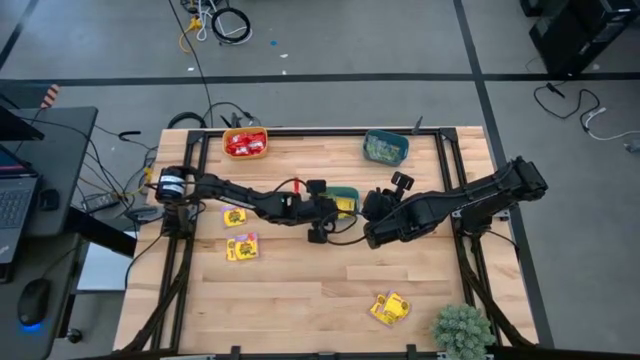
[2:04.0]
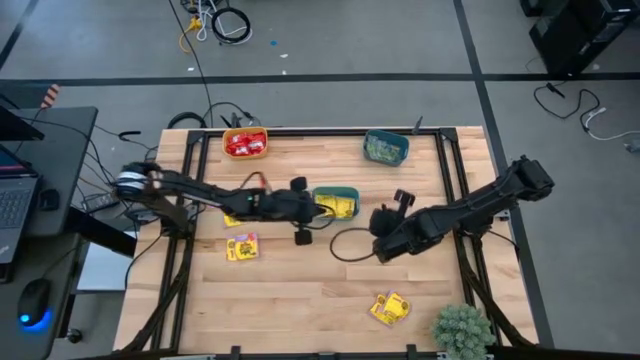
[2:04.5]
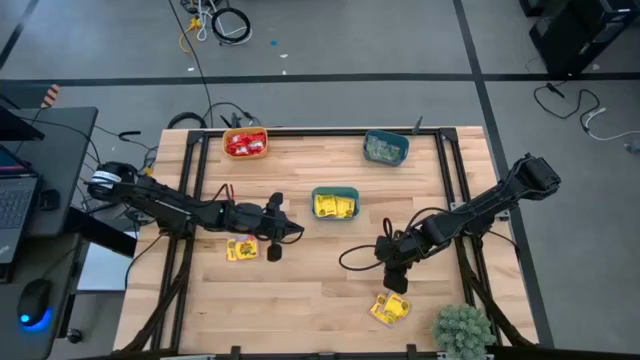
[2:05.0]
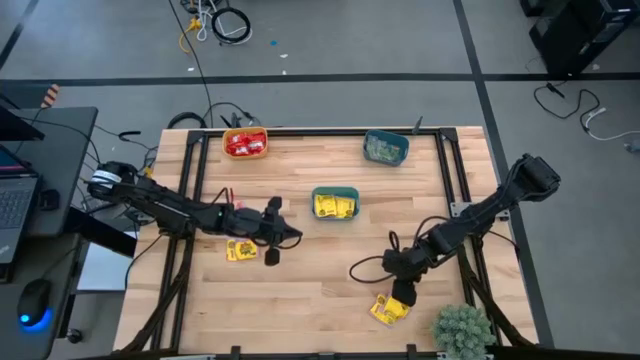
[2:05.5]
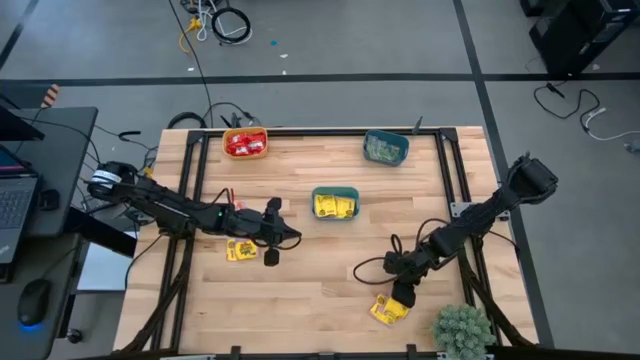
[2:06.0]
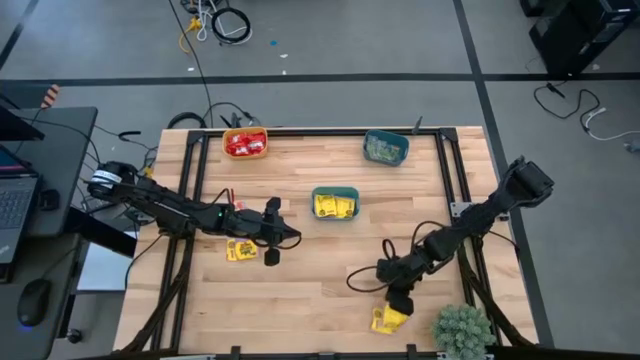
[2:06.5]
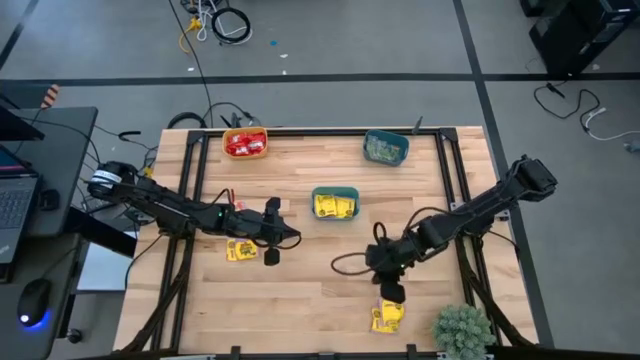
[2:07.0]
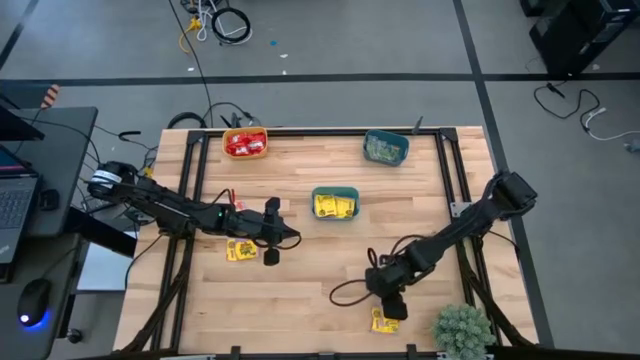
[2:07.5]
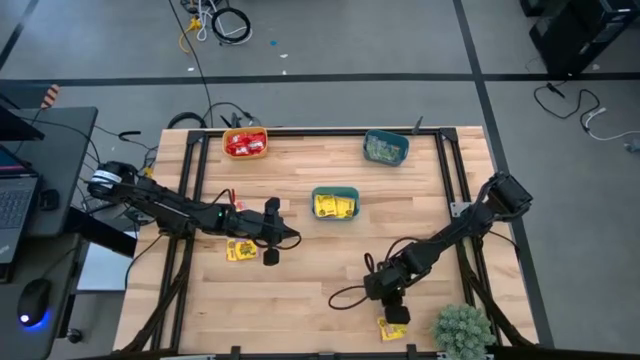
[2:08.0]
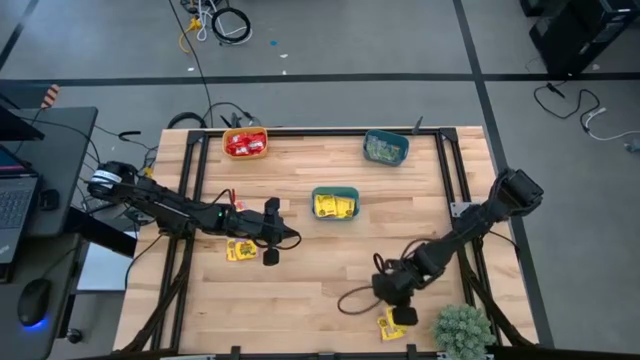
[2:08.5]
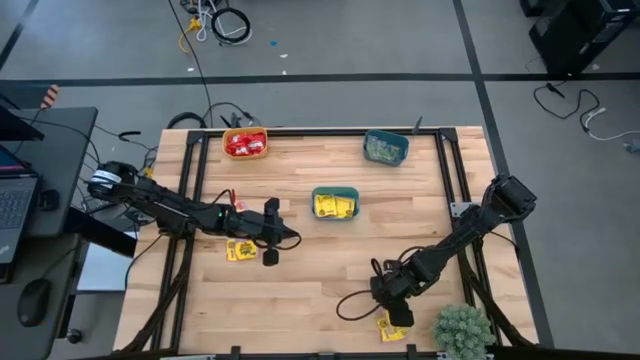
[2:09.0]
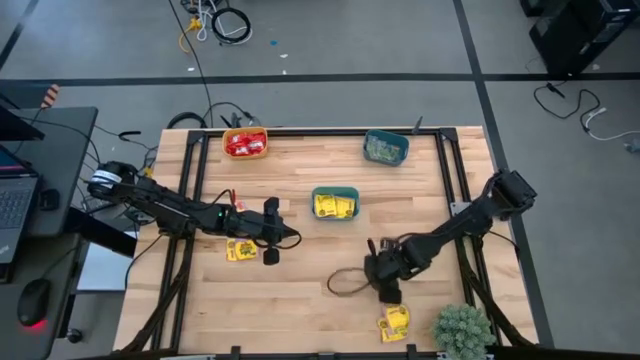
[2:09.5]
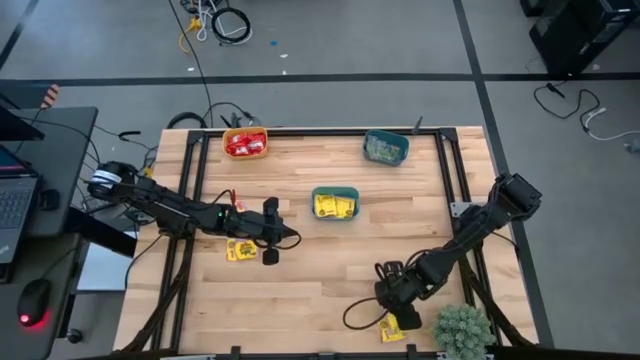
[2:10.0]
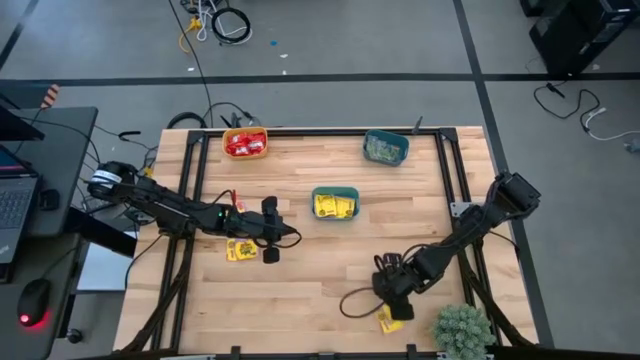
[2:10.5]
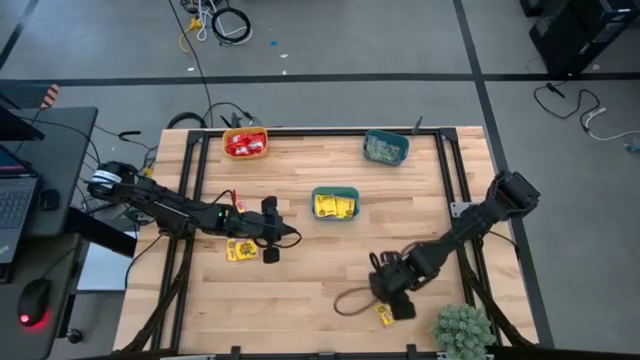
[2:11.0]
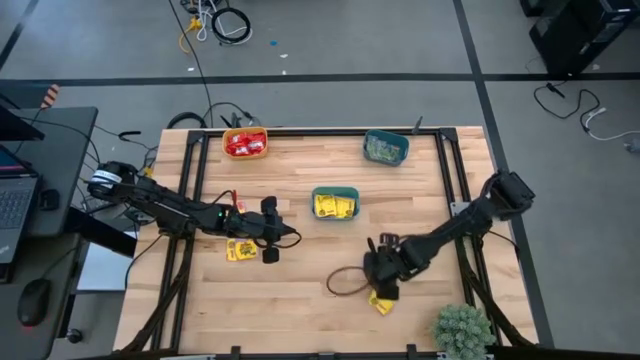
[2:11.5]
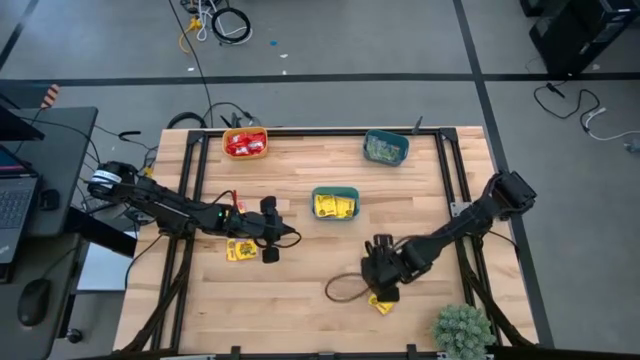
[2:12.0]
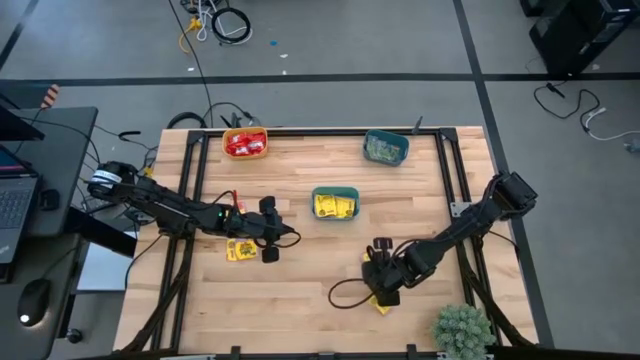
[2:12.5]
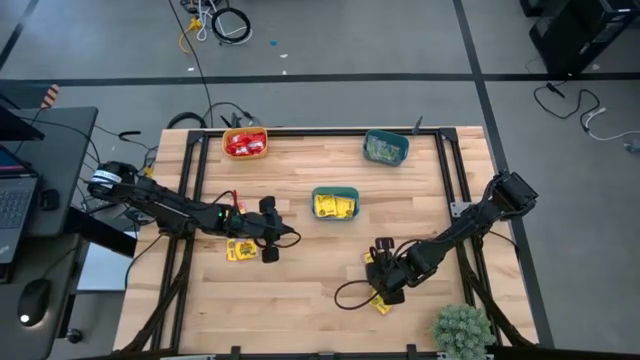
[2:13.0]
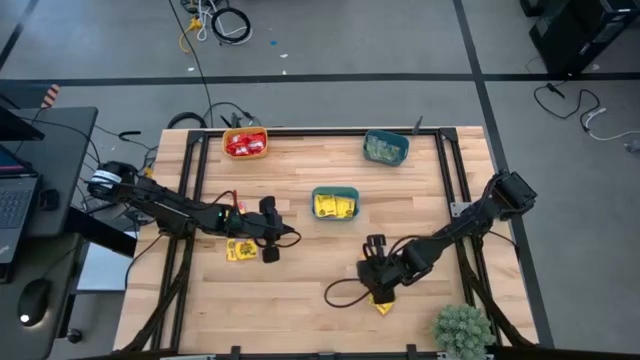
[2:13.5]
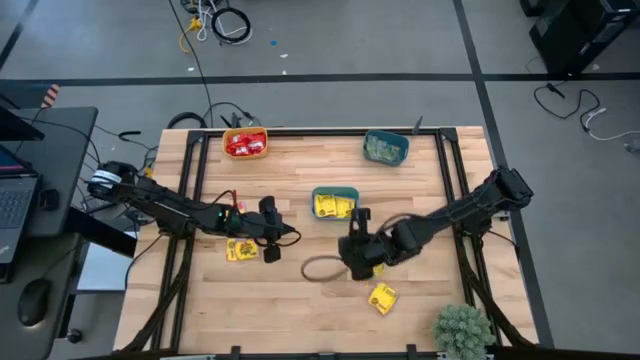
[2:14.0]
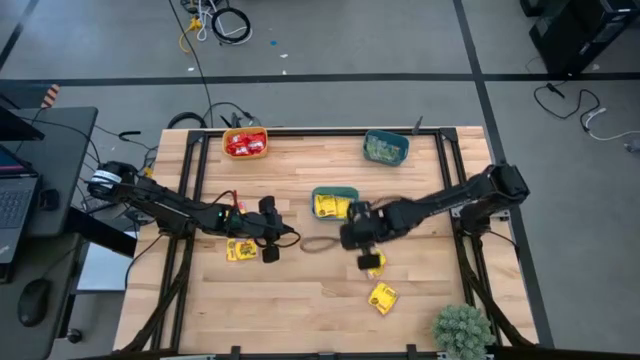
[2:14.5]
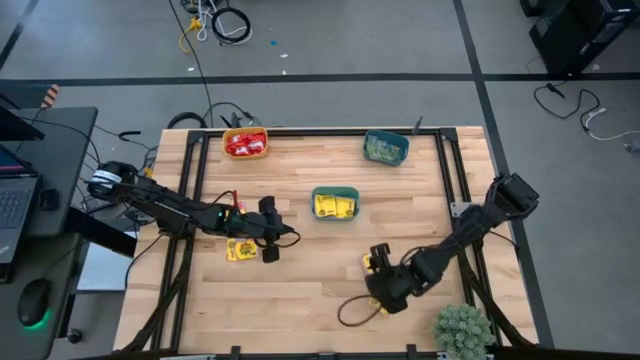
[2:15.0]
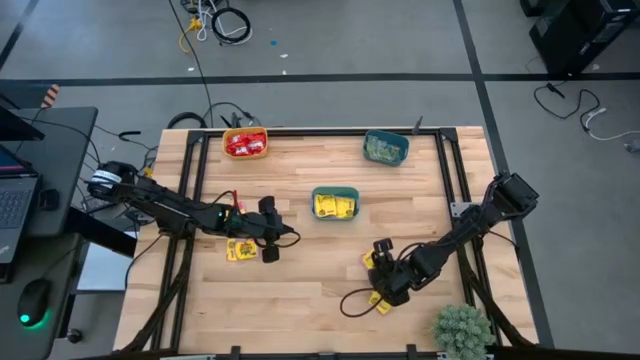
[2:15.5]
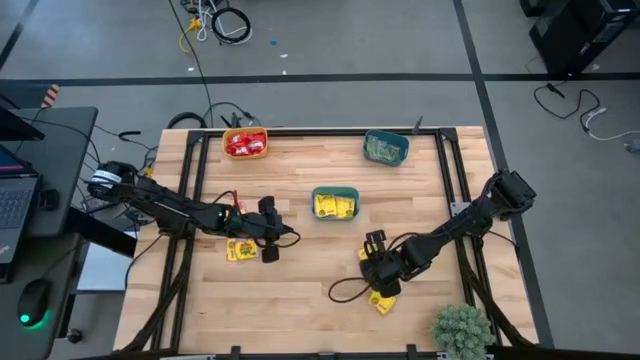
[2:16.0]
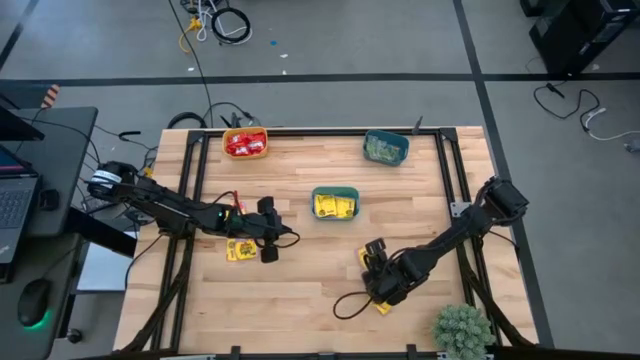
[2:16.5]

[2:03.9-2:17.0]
Task: Sort candy
Put the yellow candy into the green bin

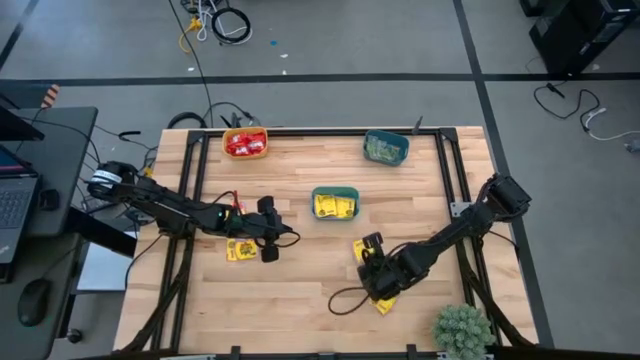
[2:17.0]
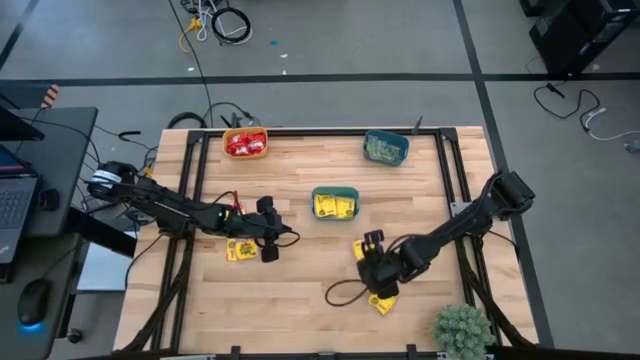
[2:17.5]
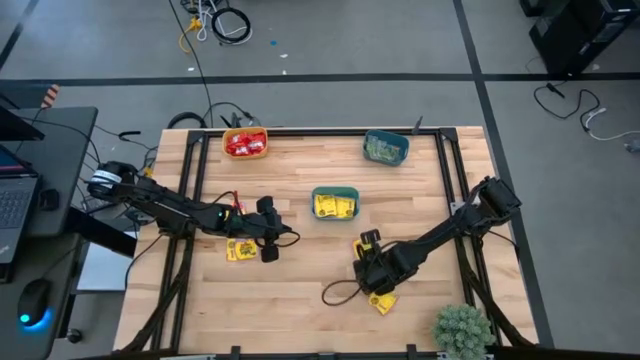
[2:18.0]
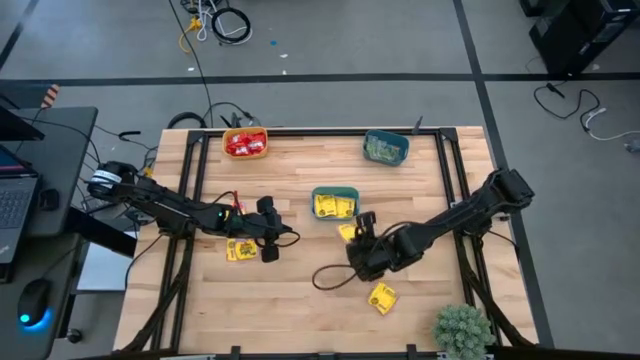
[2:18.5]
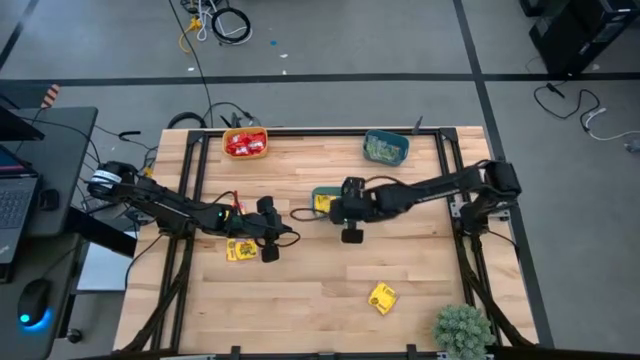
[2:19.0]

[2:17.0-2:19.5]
Put the yellow candy into the green bin

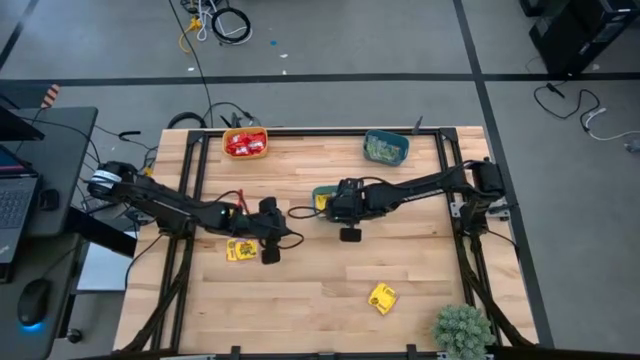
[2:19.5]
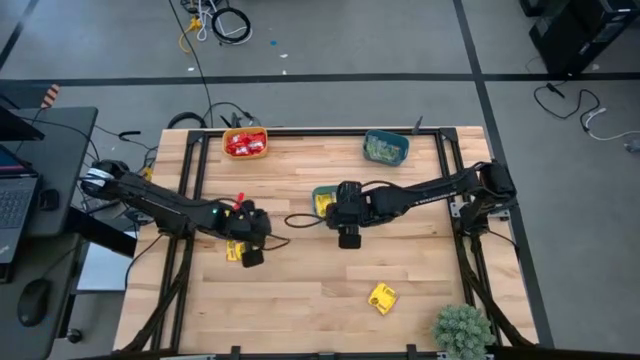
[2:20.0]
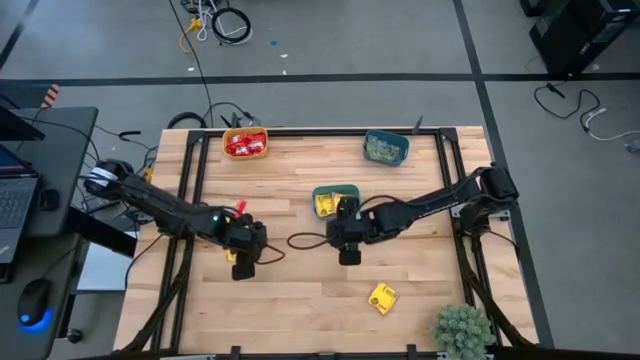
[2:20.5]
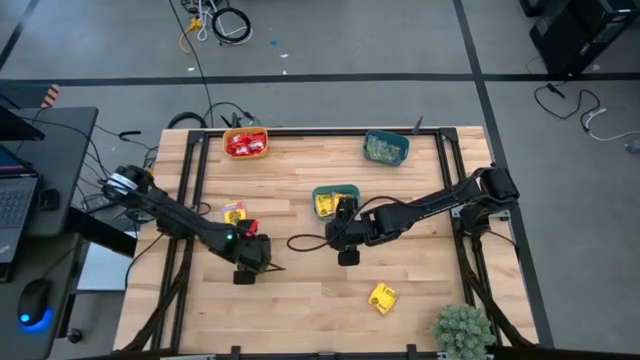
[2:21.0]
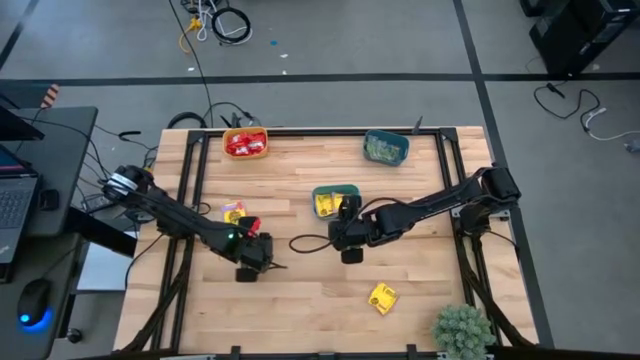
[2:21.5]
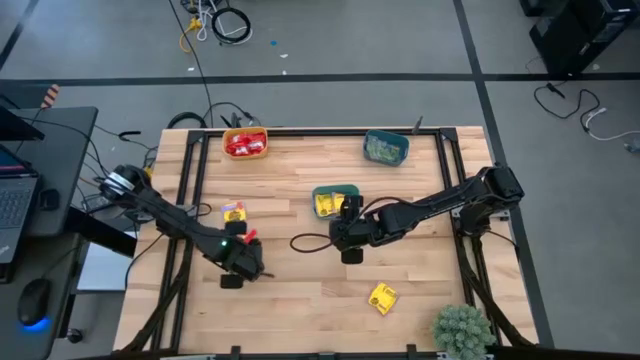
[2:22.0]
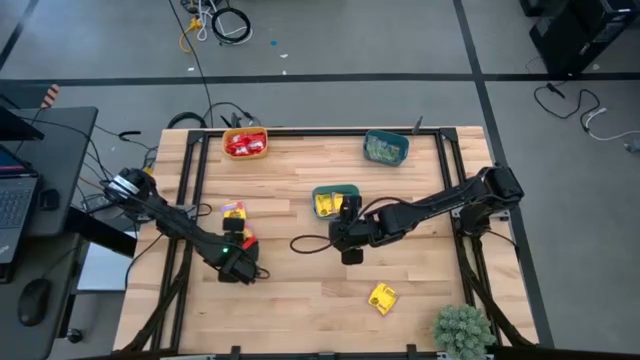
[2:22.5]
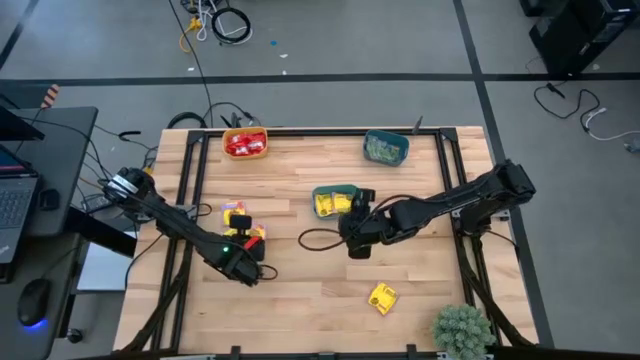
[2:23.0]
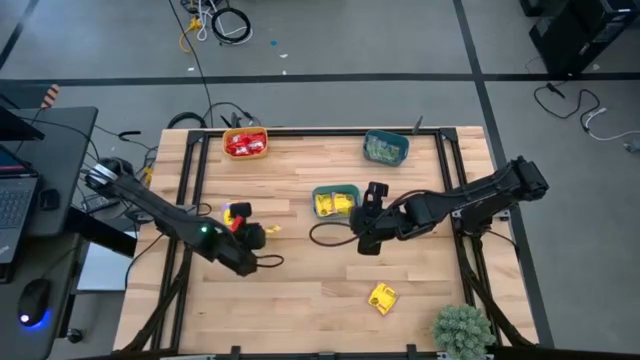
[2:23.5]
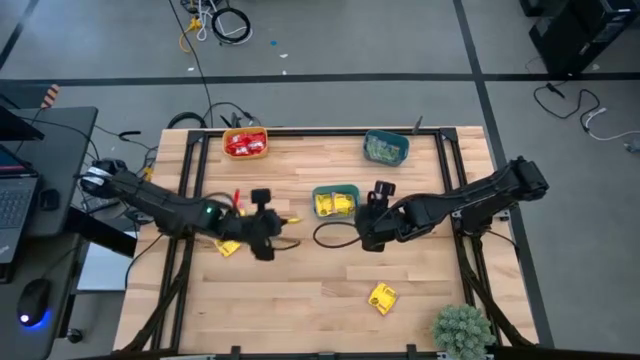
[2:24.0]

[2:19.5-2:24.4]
Put the yellow candy into the green bin

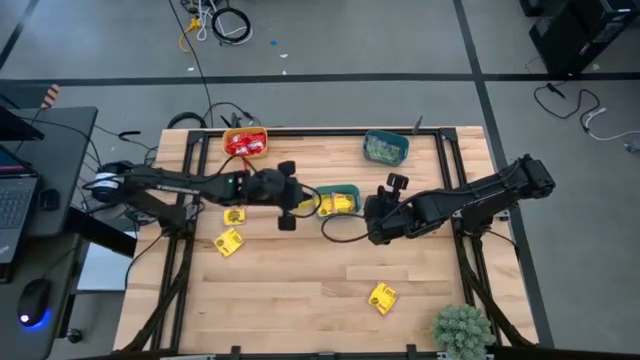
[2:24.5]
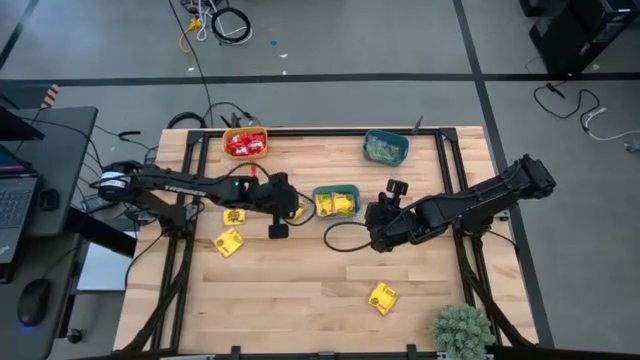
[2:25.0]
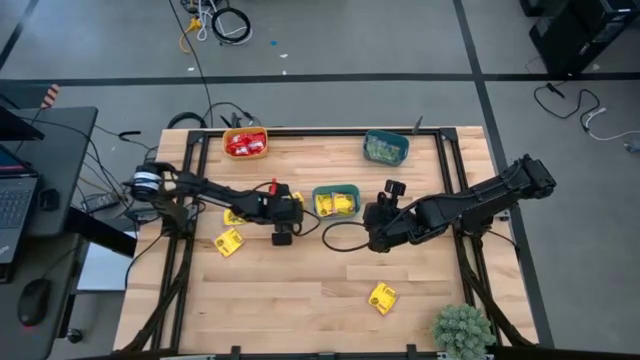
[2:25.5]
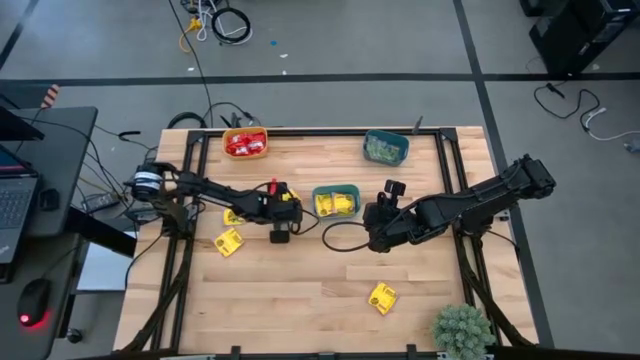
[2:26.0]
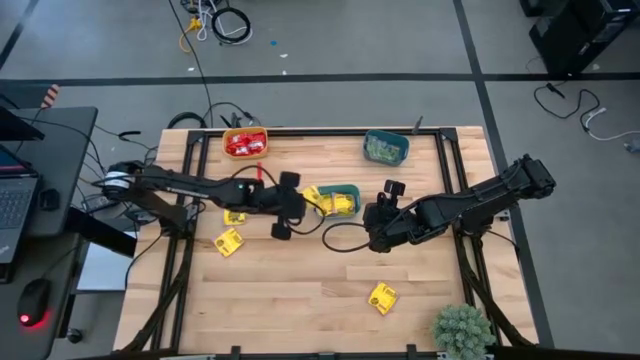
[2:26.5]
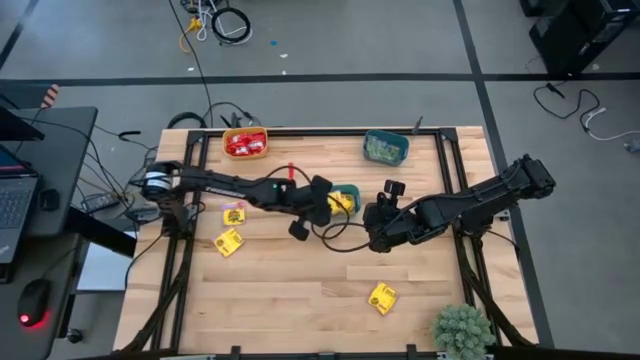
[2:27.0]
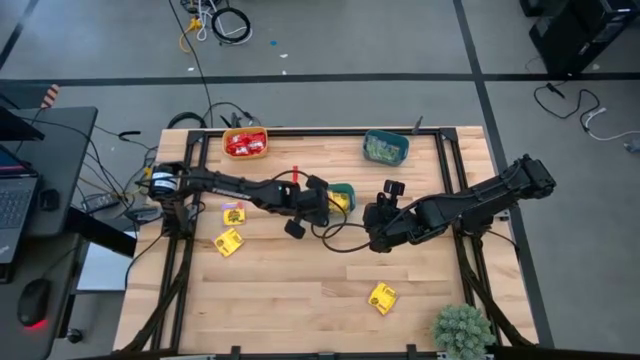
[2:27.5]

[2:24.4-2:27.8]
Put the yellow candy into the green bin
